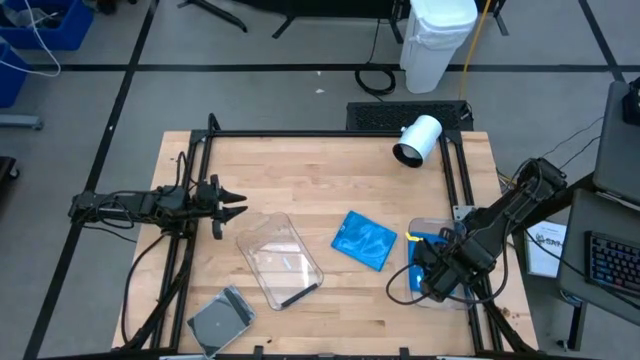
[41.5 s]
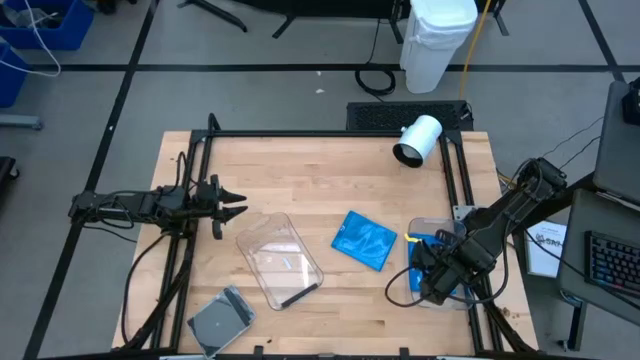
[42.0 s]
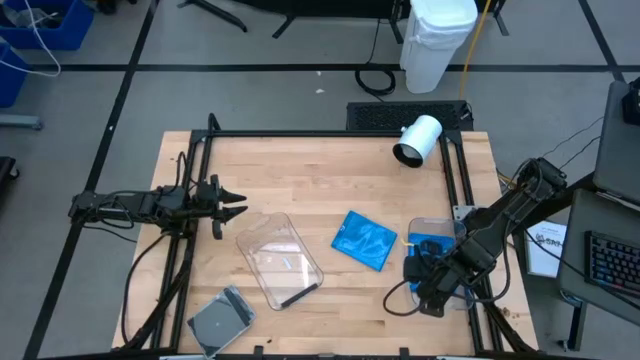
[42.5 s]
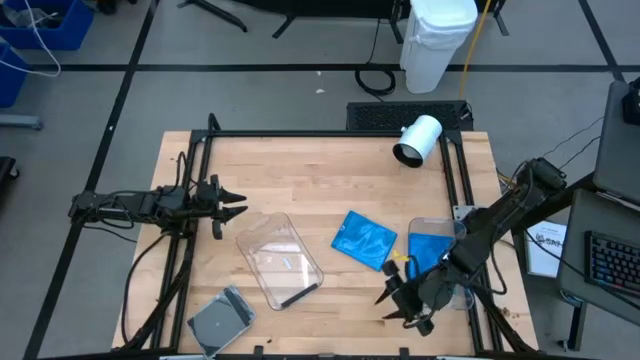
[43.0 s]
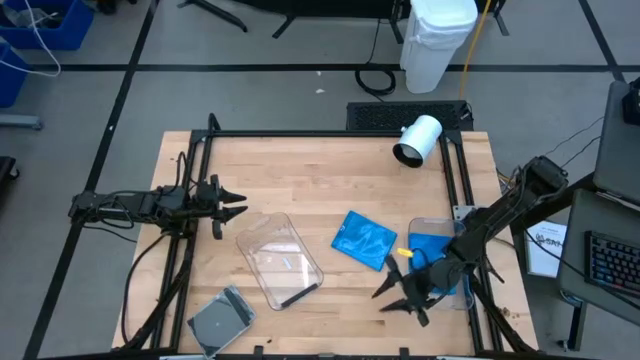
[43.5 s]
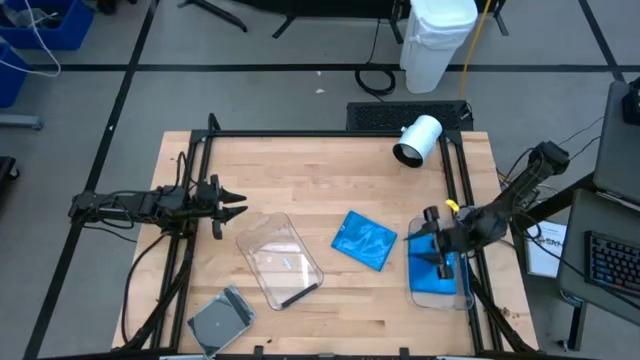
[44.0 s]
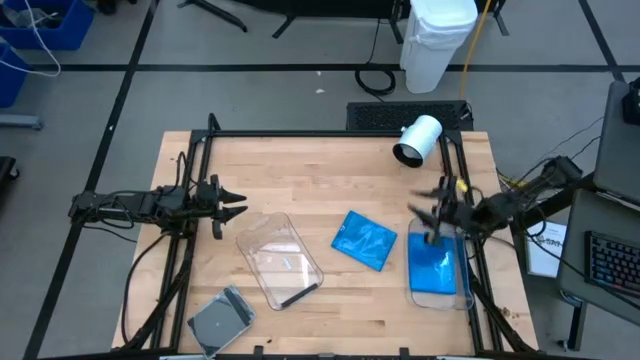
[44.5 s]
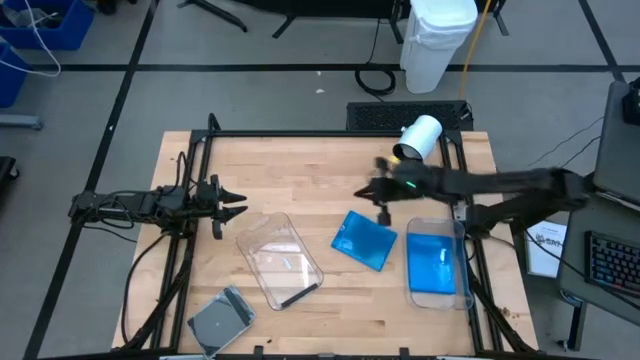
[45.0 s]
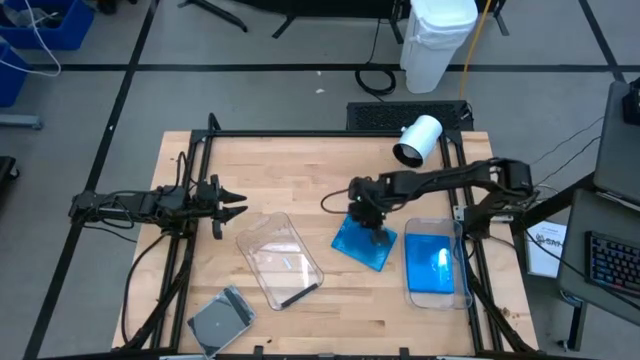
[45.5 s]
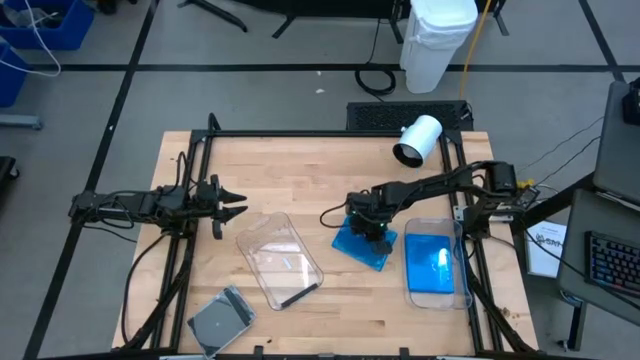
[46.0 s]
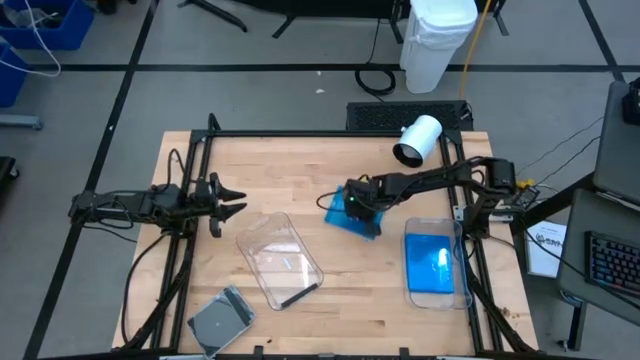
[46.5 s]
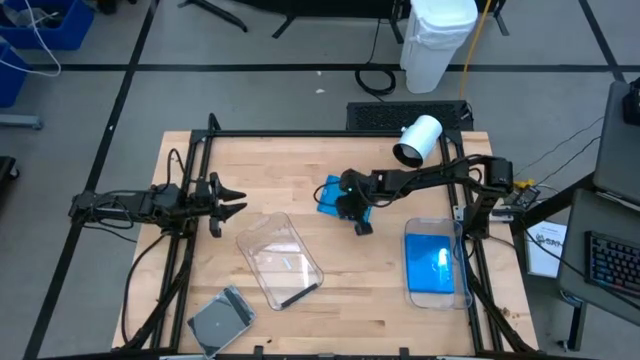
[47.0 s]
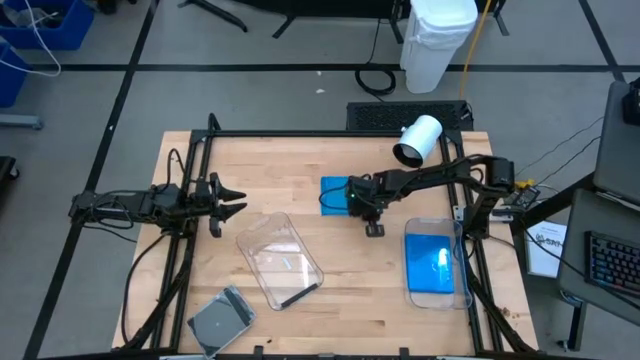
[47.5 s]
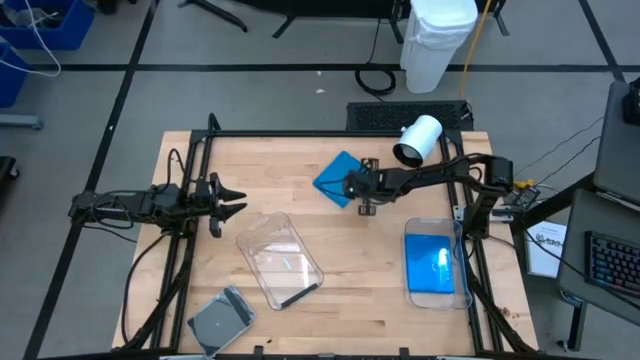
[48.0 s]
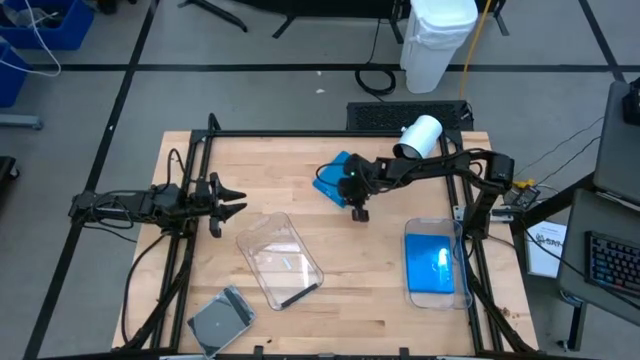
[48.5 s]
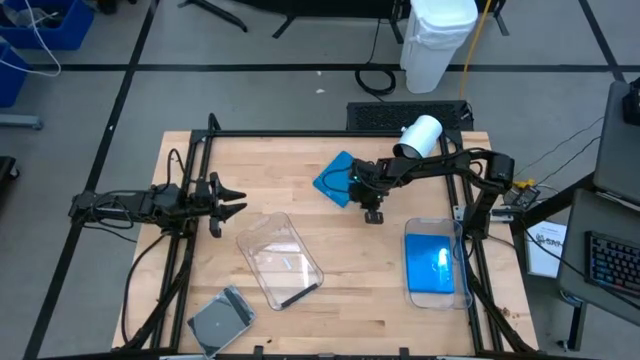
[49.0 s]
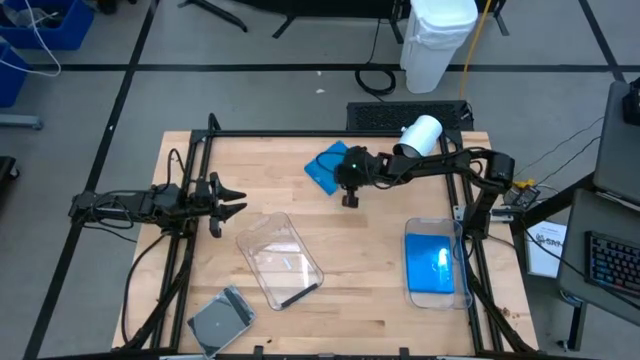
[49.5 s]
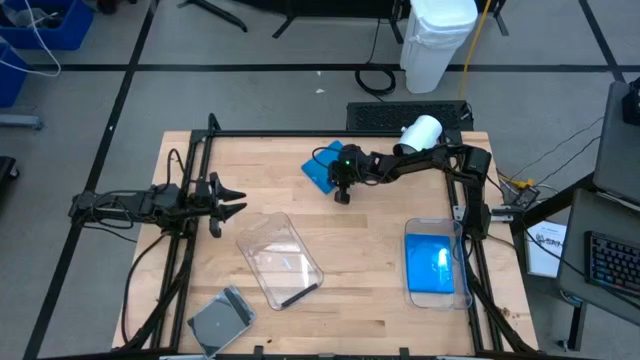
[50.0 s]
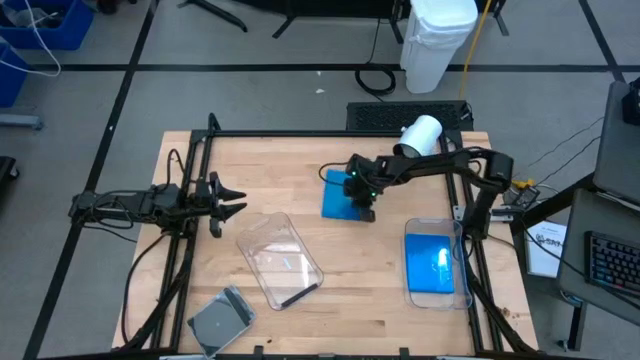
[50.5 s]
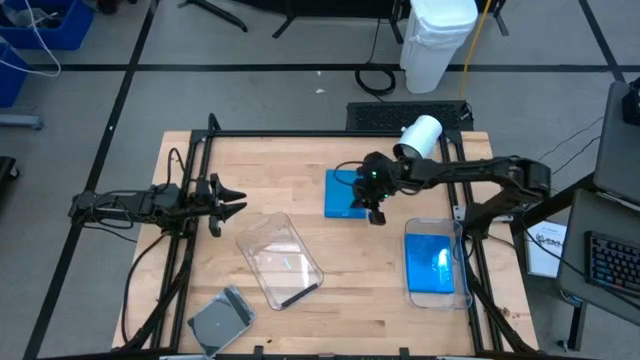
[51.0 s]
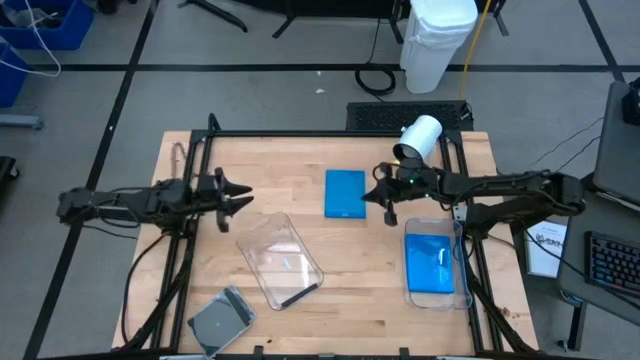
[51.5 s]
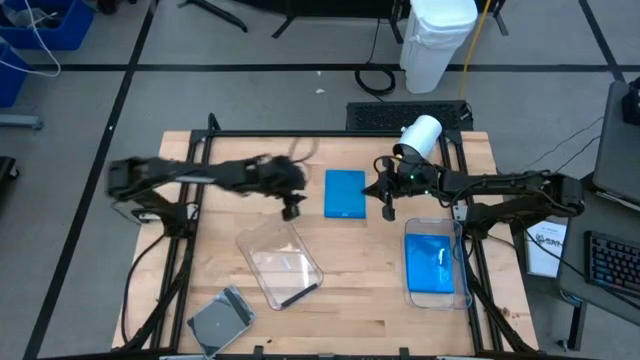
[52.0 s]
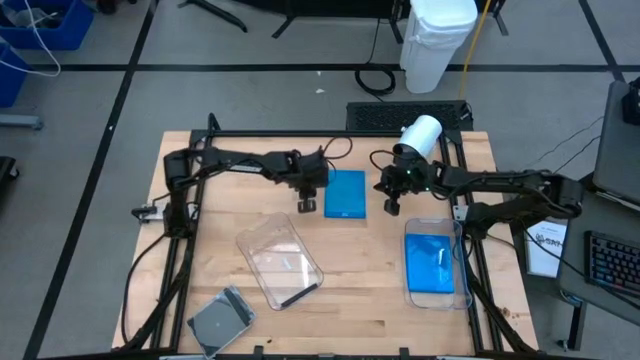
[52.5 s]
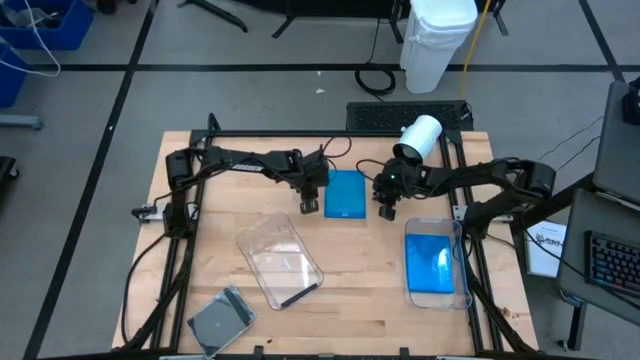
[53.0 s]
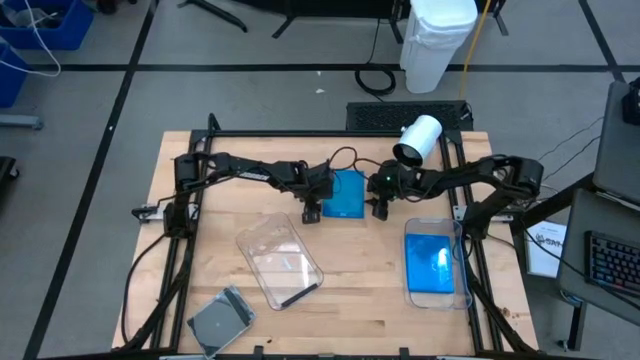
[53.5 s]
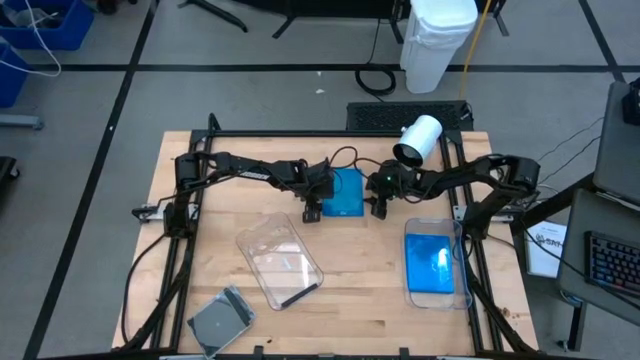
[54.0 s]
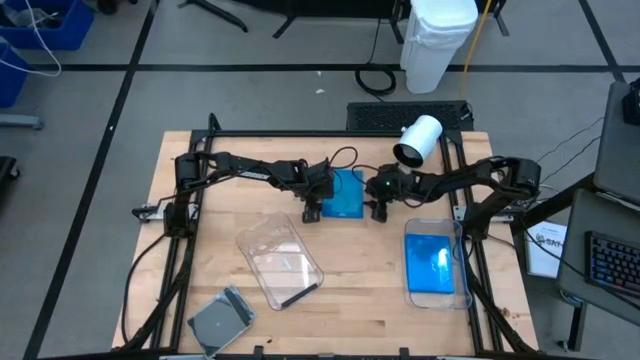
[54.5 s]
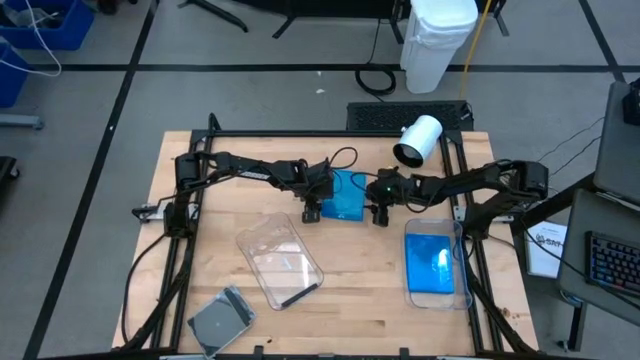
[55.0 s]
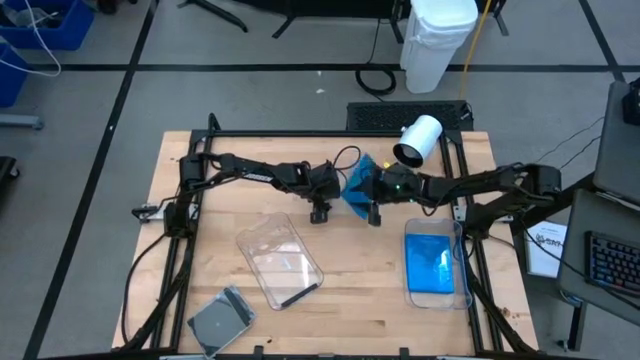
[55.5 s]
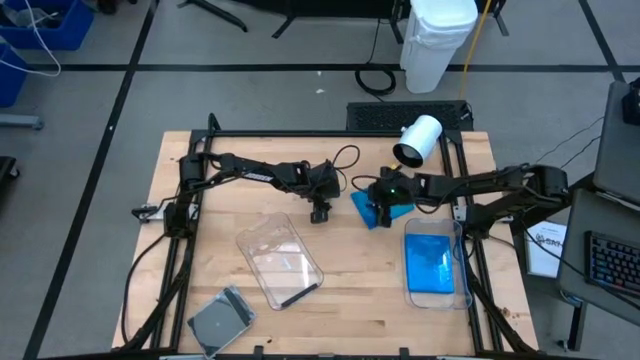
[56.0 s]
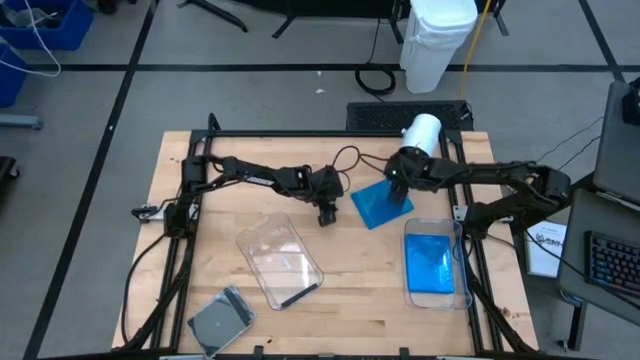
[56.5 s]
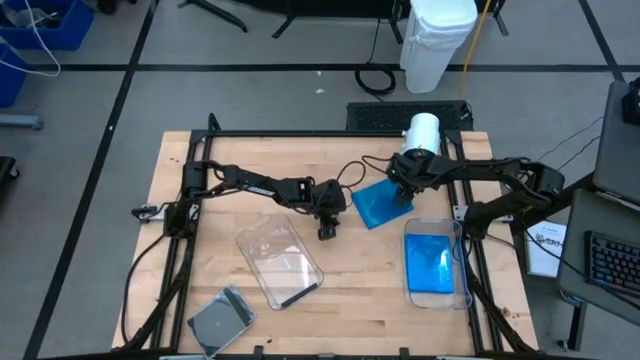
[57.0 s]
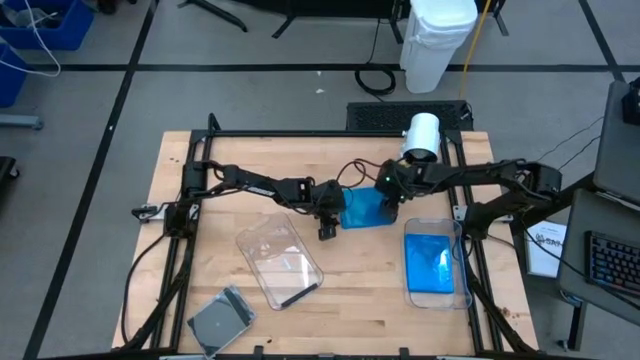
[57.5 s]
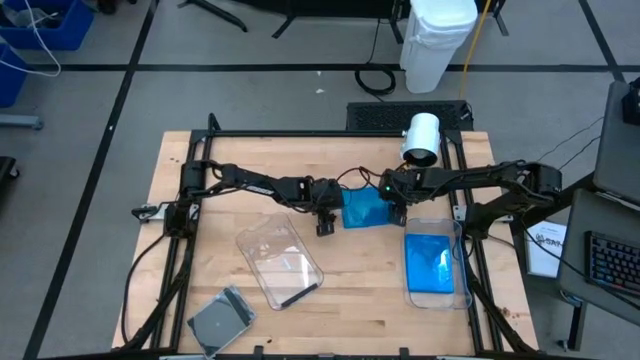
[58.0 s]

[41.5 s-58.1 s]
Task: Pick & place jewel cases by type
Put the blue disc case into the right transparent bin

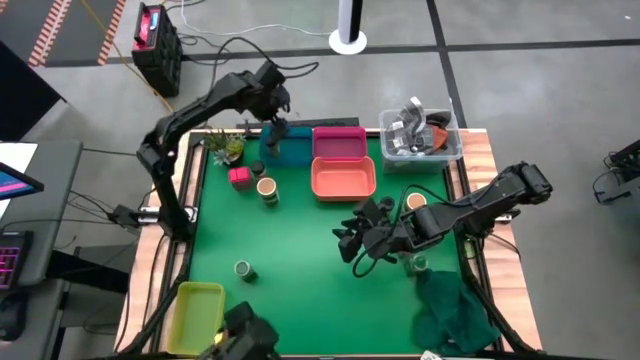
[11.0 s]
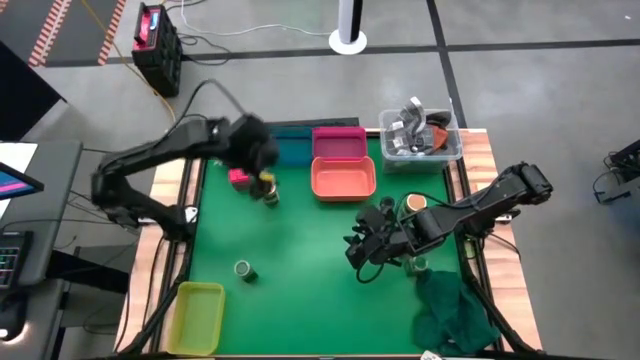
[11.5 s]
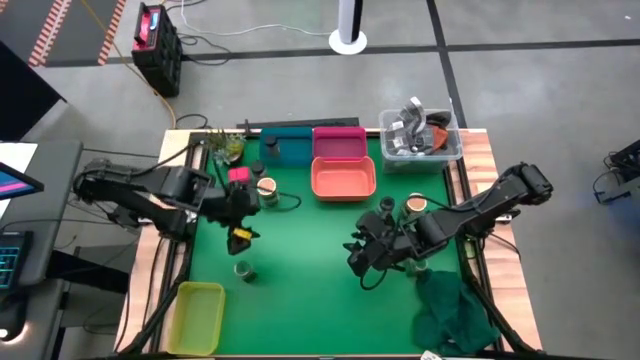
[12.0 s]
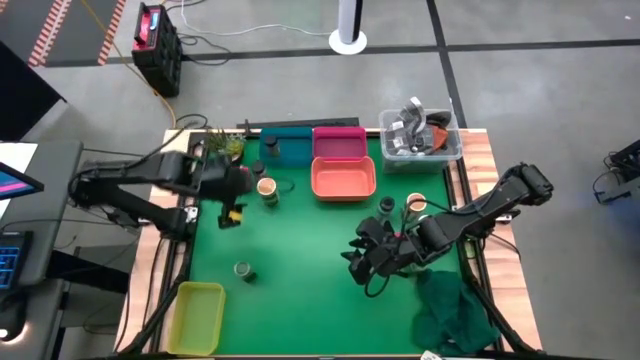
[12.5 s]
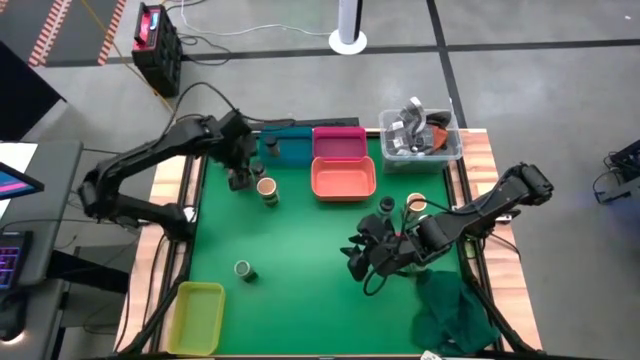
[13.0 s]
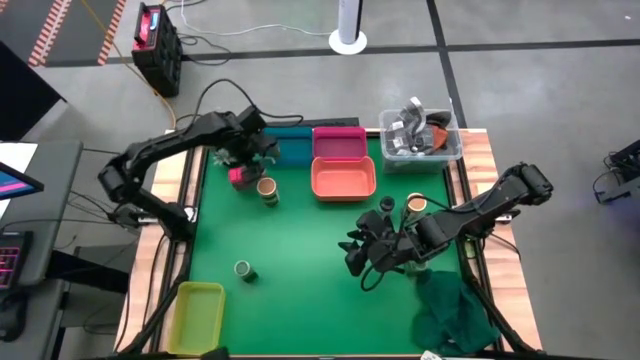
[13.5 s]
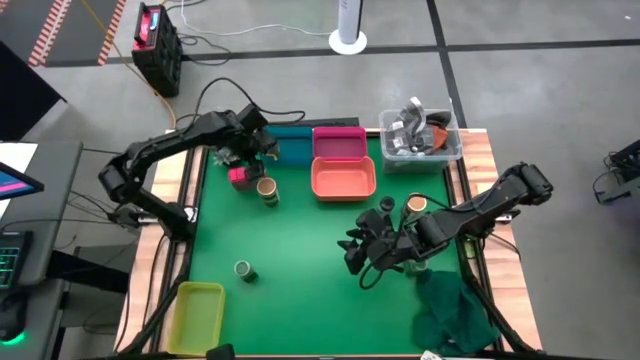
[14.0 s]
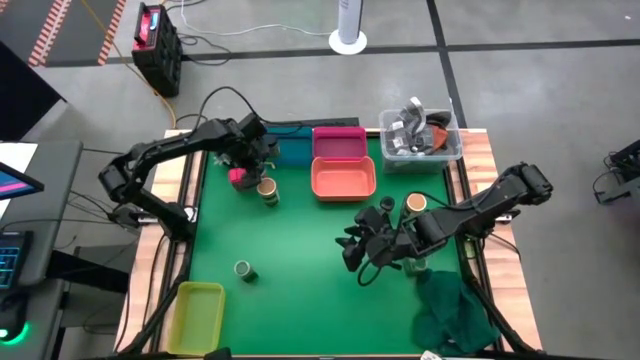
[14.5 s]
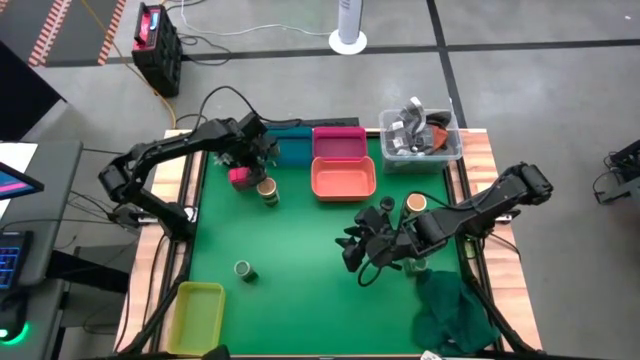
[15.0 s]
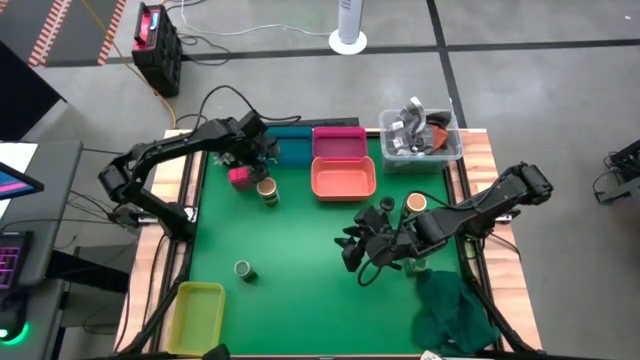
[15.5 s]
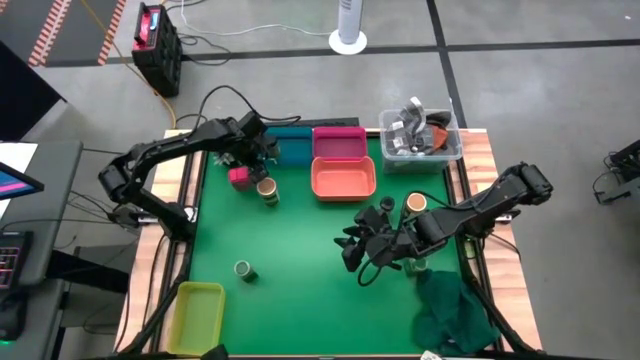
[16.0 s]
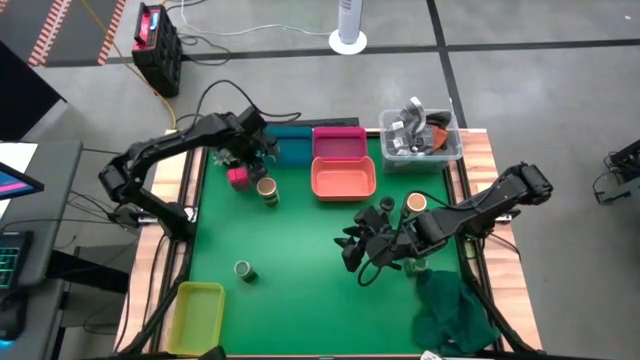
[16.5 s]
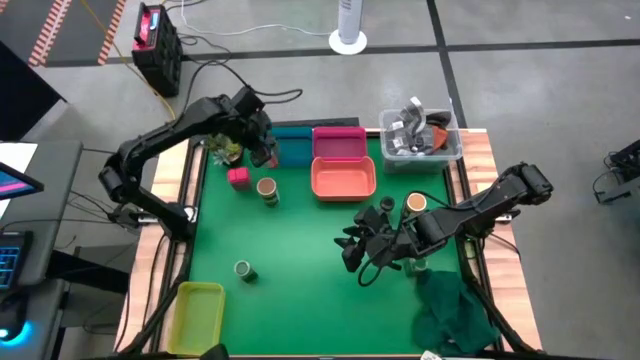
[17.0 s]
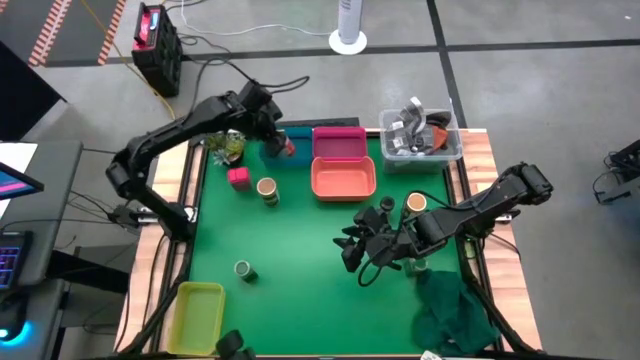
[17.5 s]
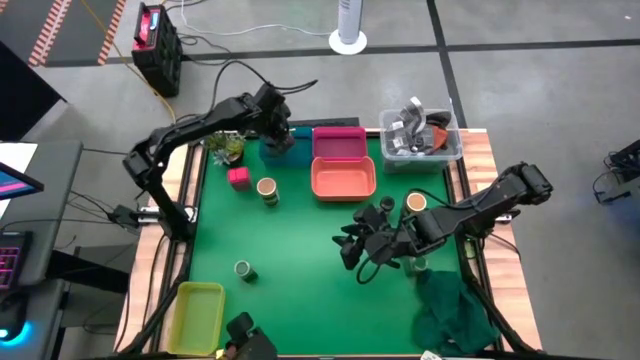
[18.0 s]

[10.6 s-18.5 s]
Task: Sort spices by type
Put the left black seasoning bottle into the blue bin
